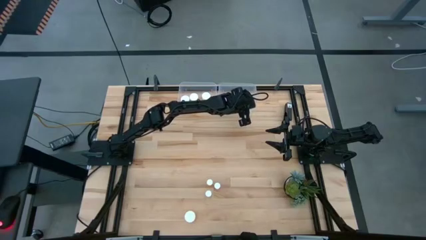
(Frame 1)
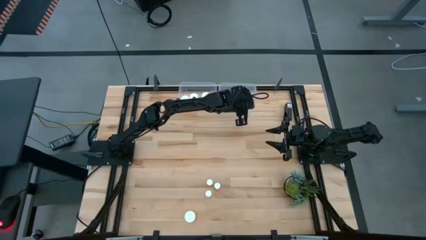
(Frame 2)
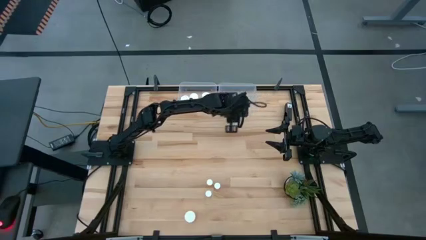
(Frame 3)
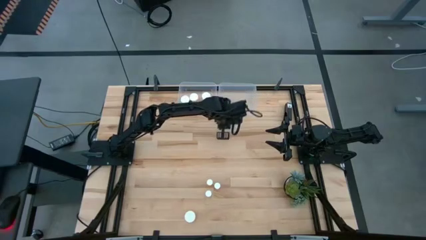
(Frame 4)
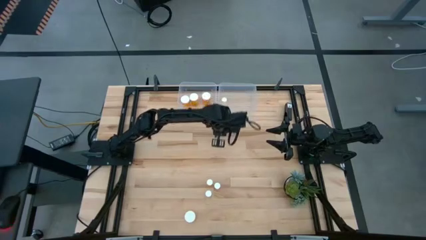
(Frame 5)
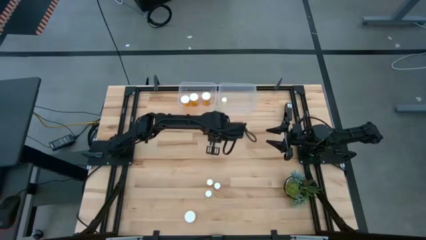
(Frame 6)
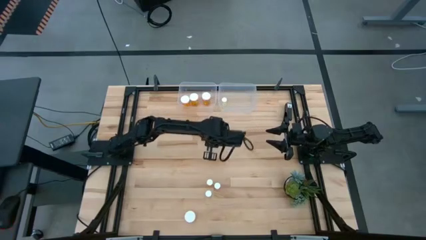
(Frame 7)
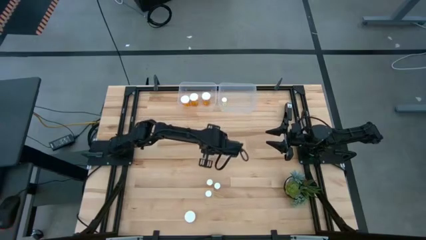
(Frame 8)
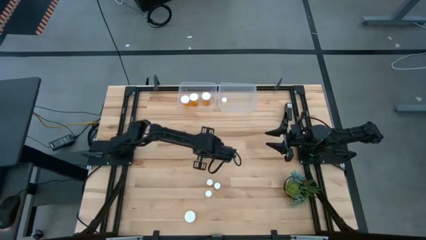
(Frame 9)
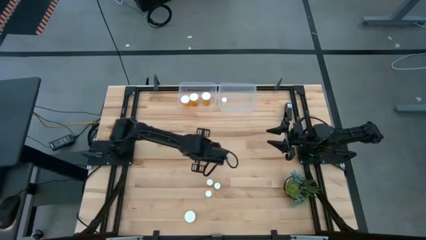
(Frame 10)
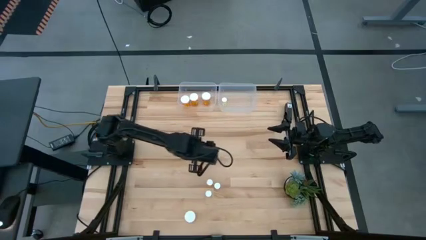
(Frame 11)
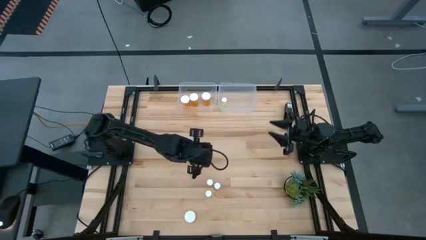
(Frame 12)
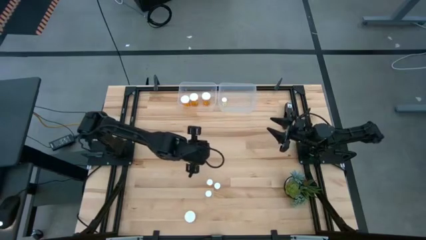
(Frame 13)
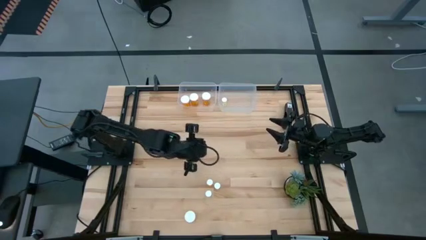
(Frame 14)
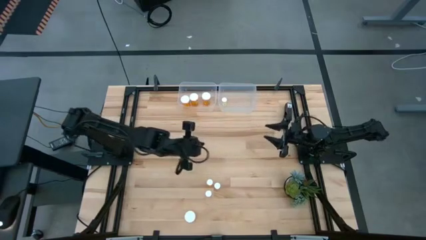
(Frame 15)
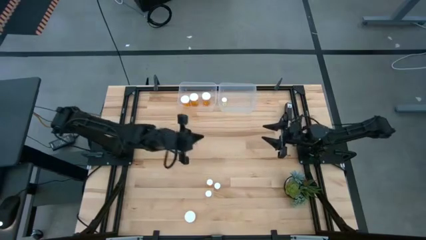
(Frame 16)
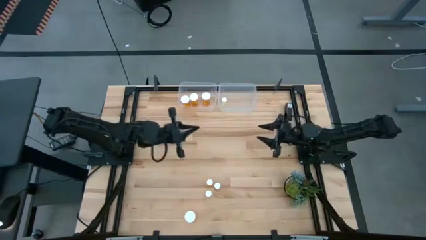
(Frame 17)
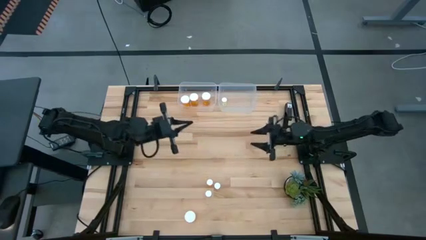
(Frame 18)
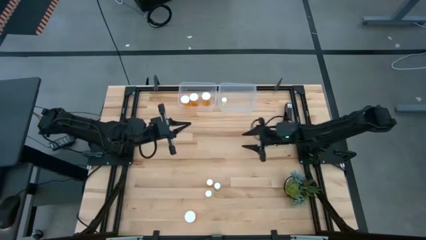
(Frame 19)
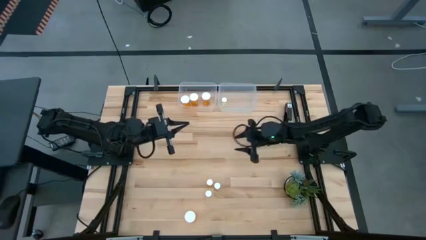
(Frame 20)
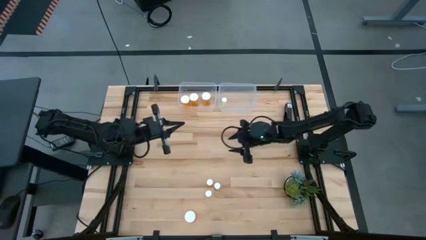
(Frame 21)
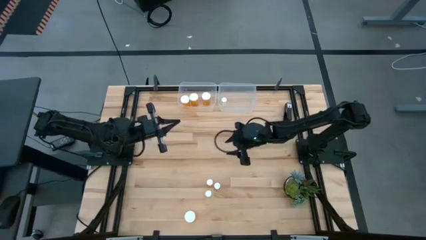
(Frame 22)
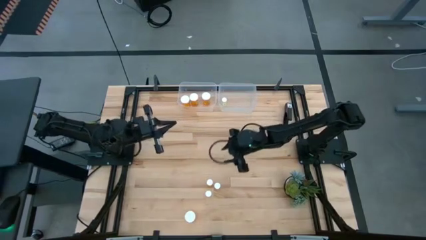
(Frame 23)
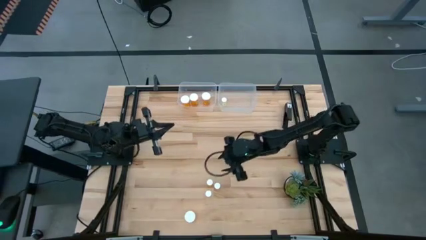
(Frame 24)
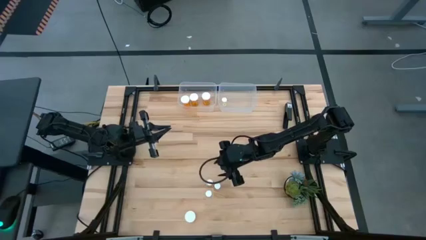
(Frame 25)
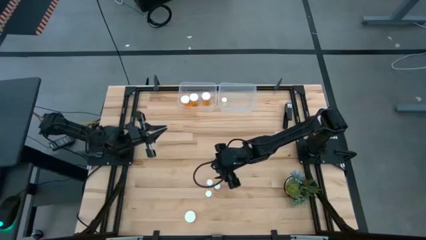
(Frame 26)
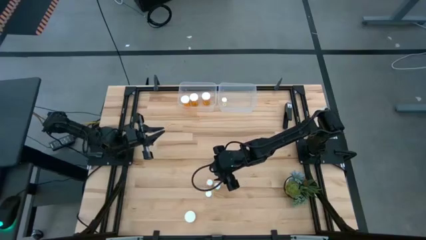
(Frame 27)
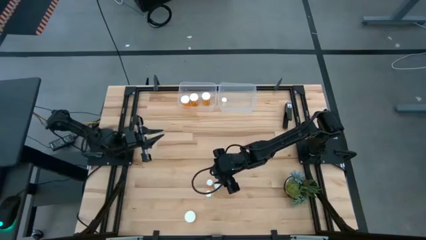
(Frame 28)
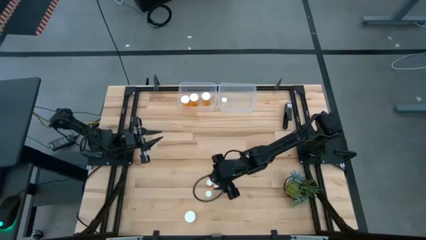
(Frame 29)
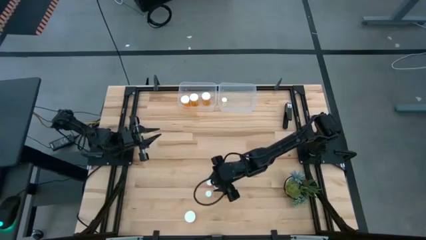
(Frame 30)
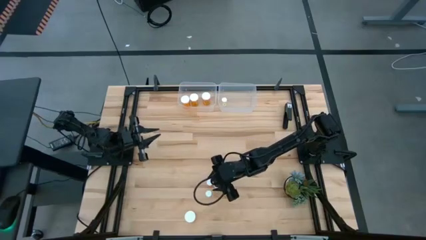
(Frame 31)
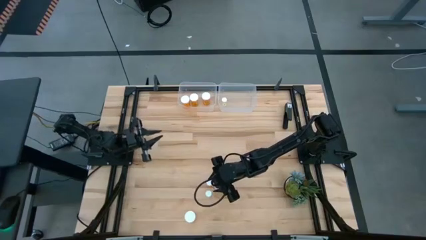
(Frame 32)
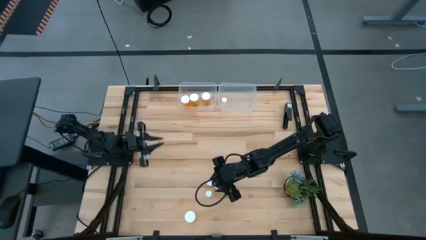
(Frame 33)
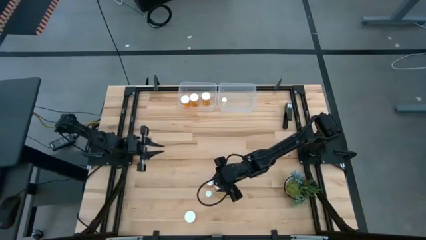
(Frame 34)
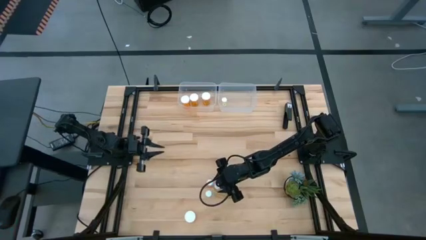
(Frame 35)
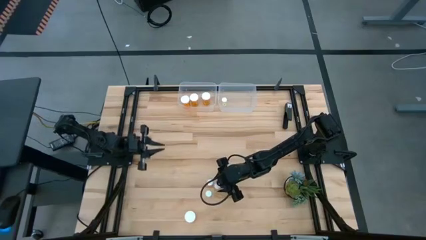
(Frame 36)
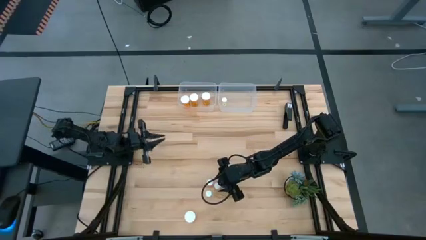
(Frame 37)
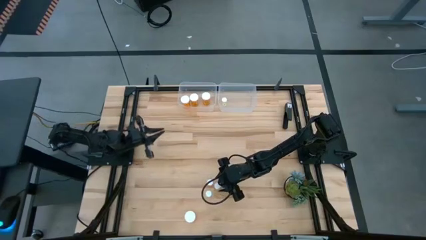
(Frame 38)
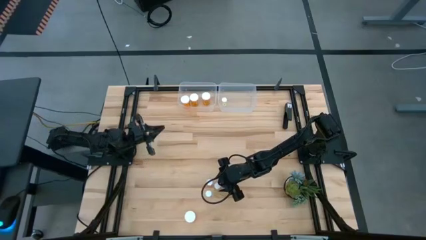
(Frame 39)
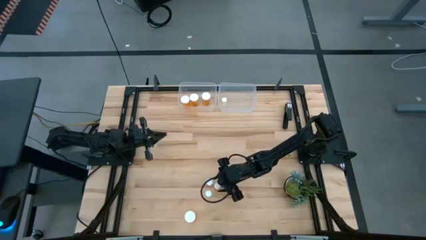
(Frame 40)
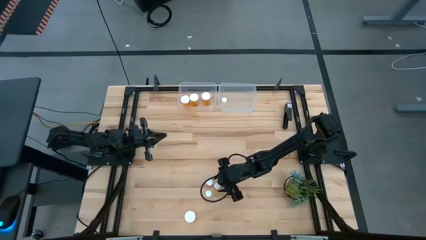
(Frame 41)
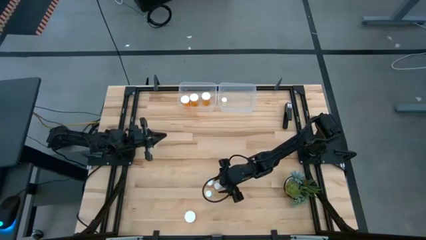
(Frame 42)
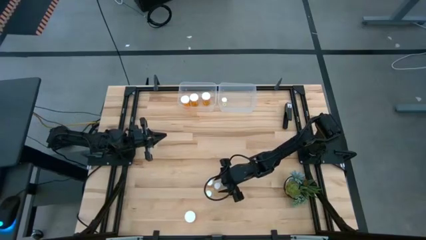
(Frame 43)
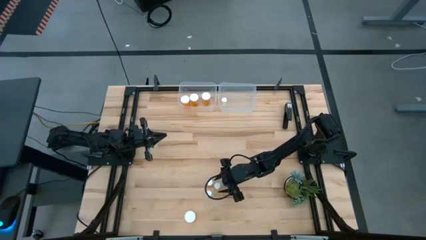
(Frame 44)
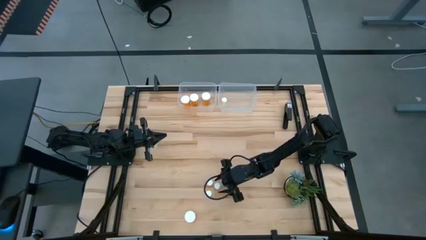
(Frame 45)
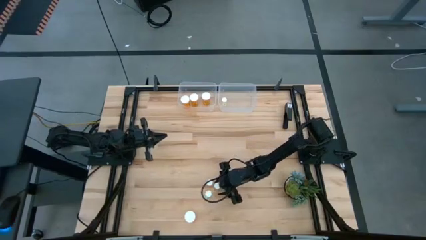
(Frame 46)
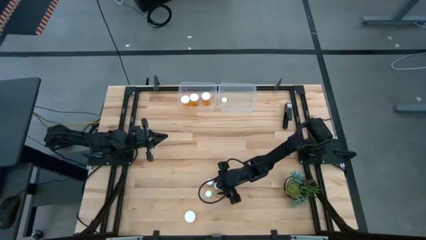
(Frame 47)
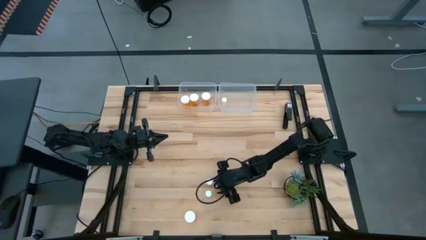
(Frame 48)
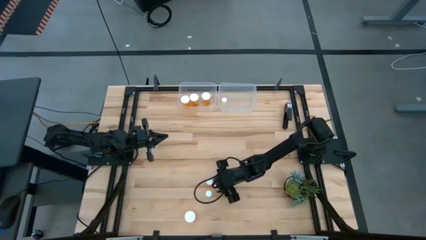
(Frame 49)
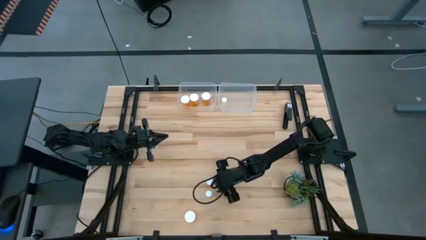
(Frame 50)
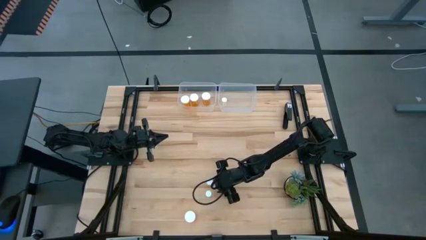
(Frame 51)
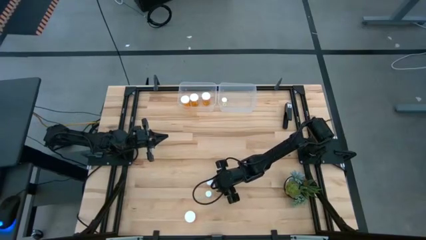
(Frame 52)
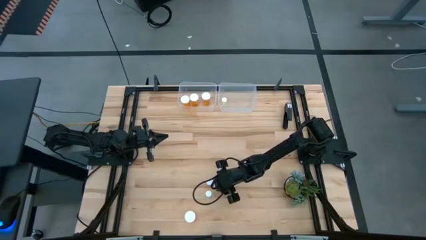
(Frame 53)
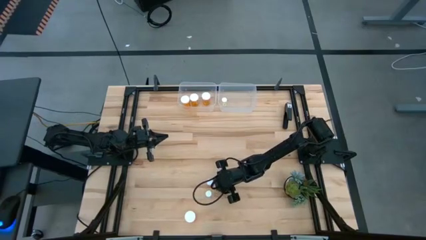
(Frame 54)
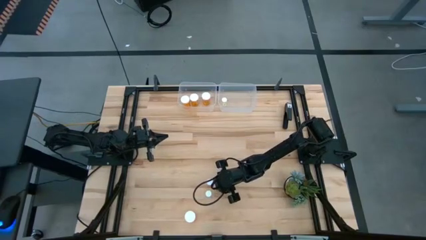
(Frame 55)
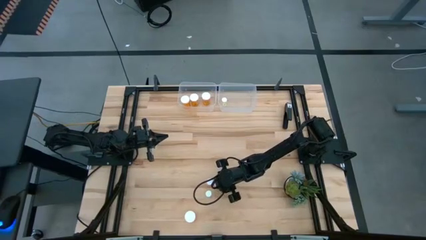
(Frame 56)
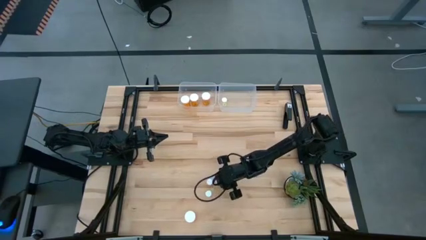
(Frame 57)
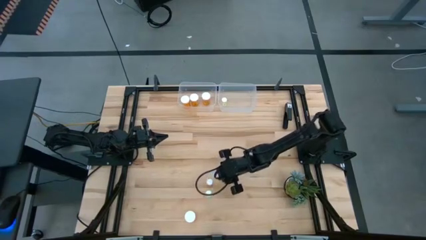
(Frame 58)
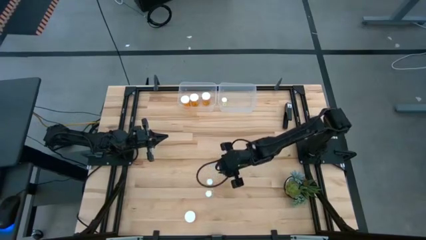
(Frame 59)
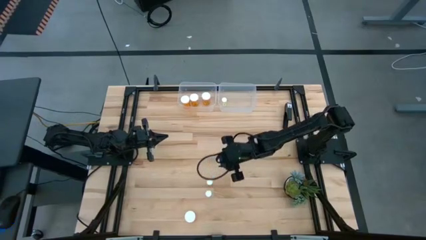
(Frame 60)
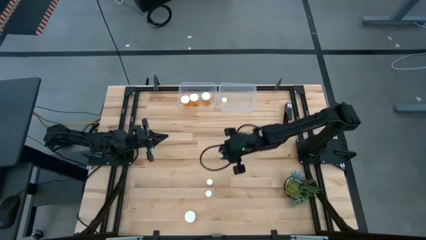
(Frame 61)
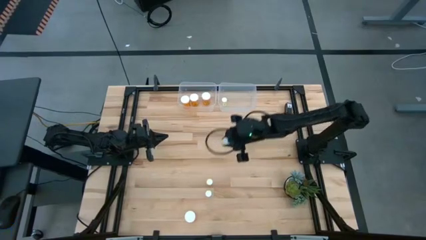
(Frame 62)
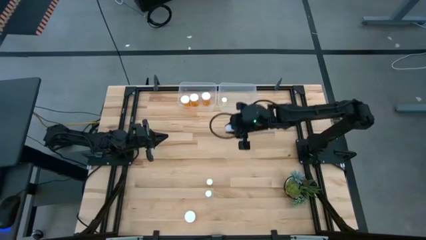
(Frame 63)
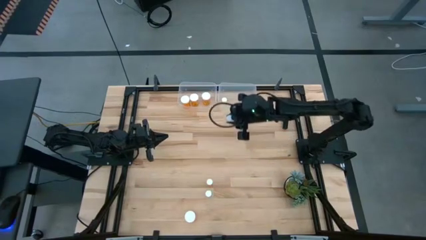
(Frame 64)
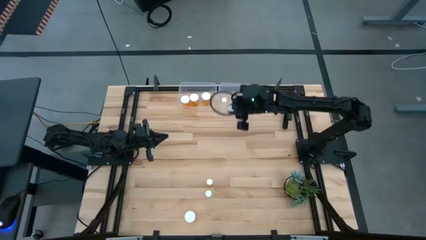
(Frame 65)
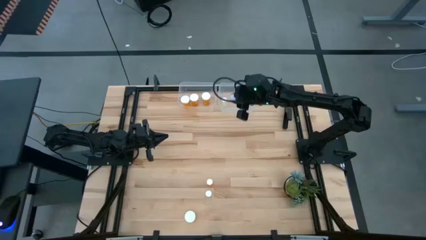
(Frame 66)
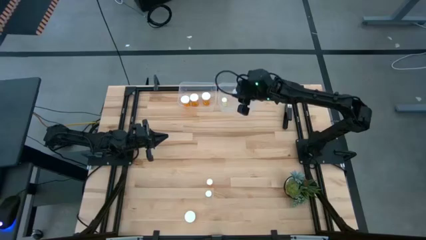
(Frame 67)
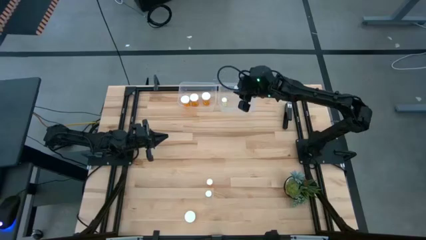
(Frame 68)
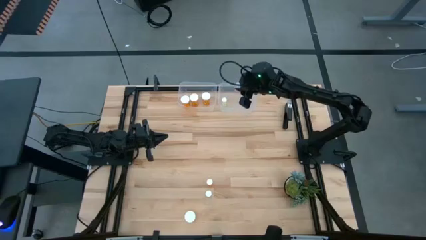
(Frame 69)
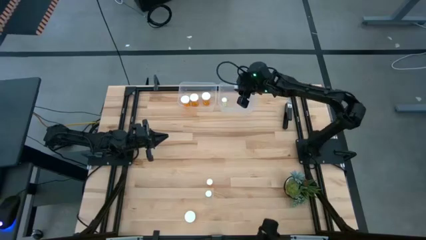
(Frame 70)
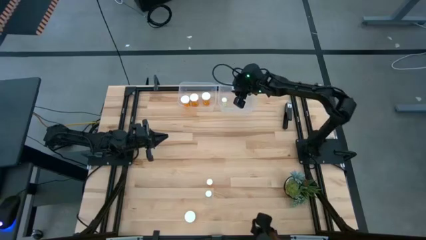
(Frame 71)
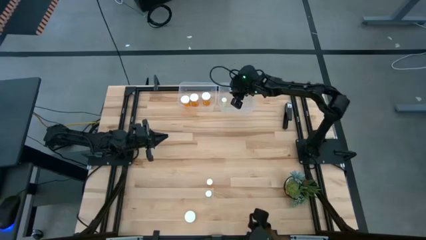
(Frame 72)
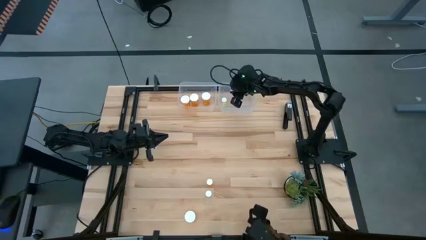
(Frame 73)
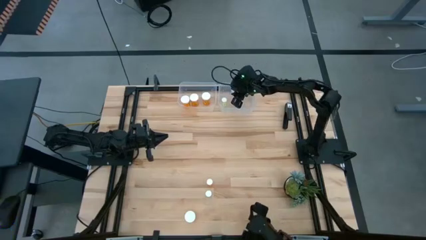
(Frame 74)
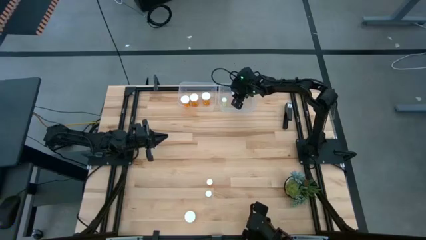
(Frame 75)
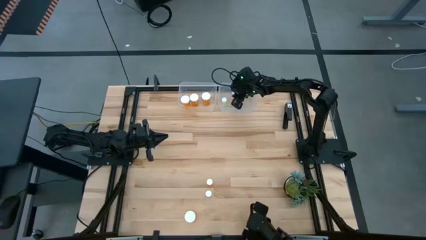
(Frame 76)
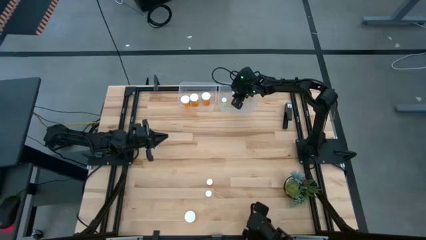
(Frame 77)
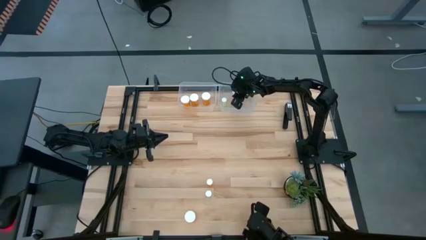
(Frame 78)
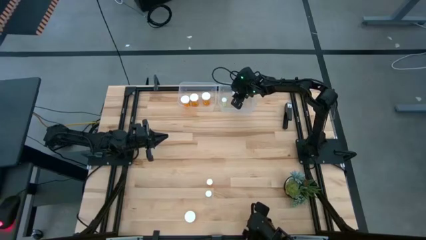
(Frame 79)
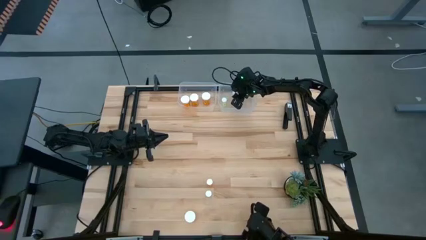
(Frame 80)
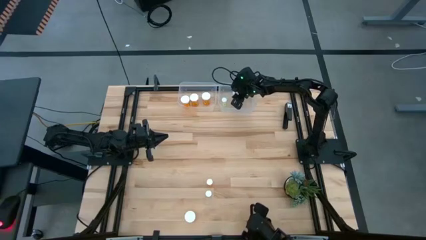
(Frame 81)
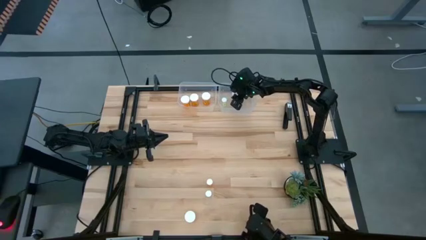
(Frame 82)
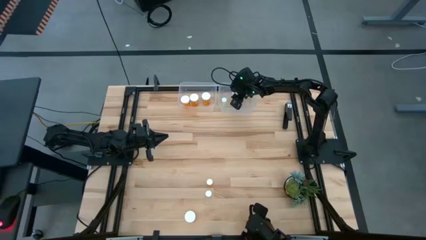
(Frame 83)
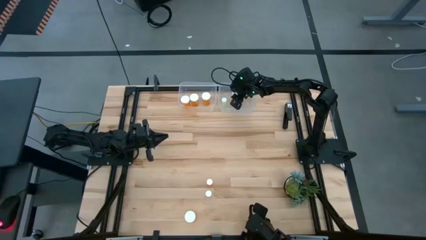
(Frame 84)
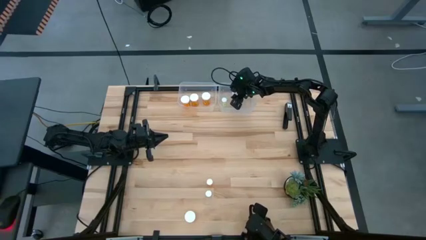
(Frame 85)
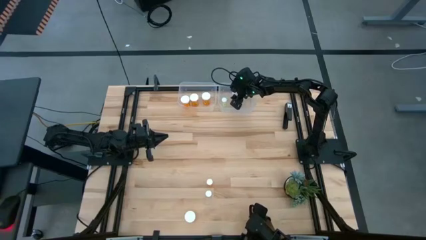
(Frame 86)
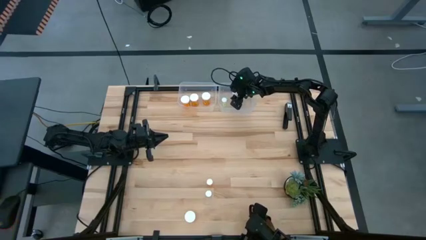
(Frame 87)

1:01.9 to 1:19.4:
Task: Pick and place medicine bottles into bin by pill shape (circle, oval)
Put the yellow pill bottle into the right transparent bin
